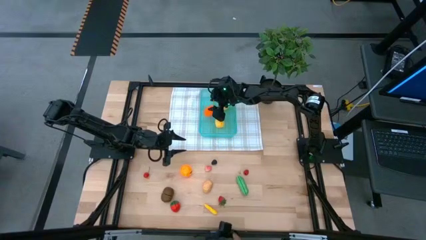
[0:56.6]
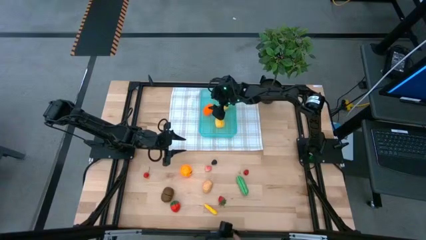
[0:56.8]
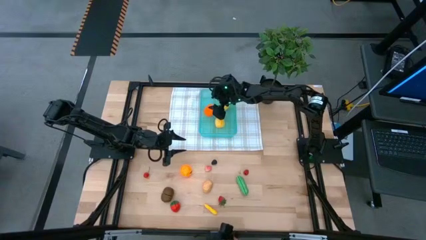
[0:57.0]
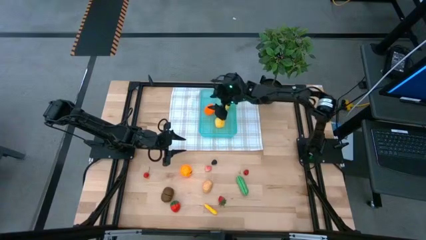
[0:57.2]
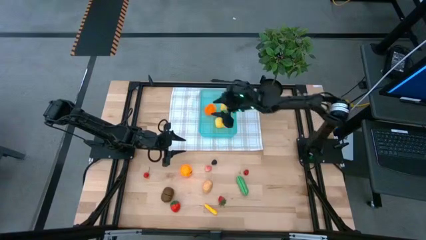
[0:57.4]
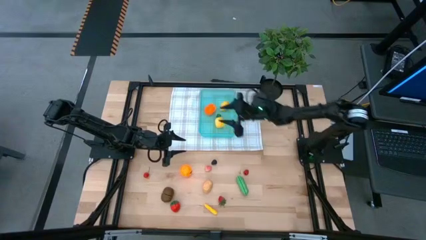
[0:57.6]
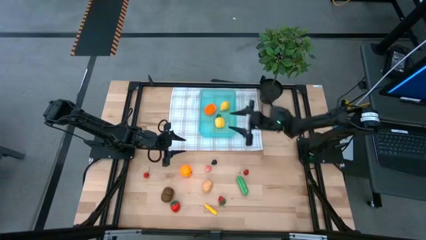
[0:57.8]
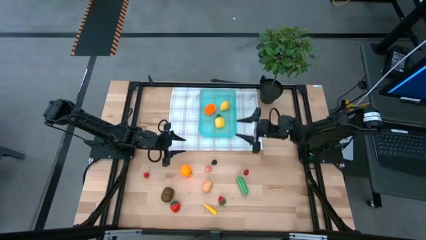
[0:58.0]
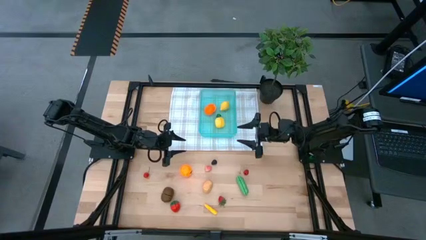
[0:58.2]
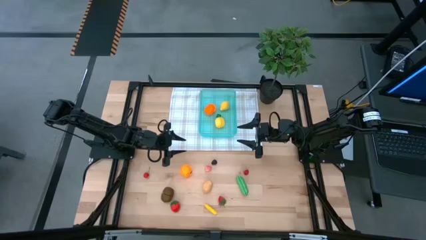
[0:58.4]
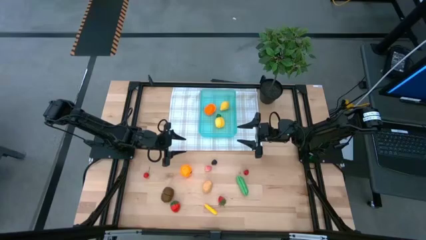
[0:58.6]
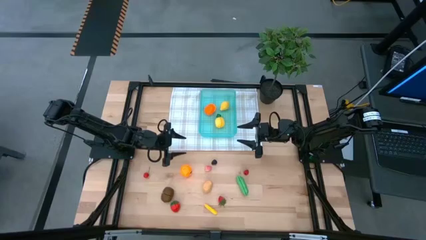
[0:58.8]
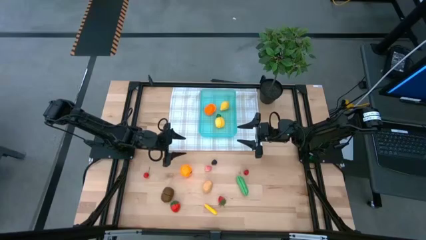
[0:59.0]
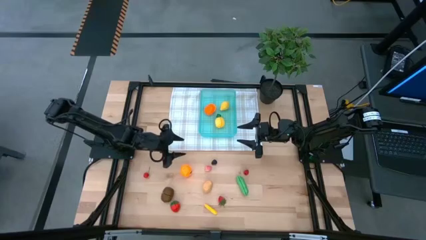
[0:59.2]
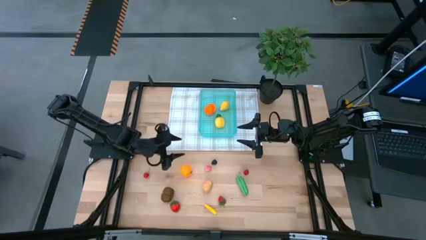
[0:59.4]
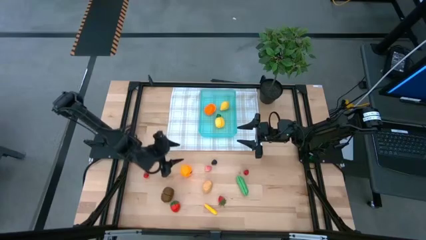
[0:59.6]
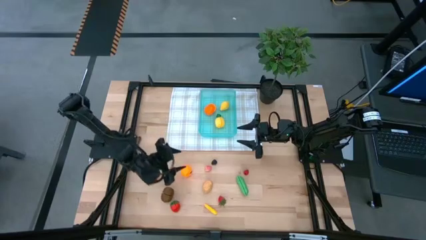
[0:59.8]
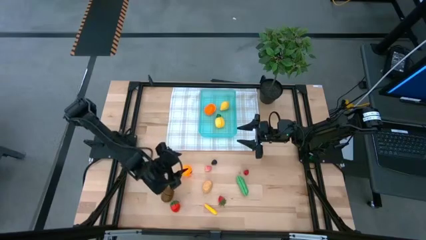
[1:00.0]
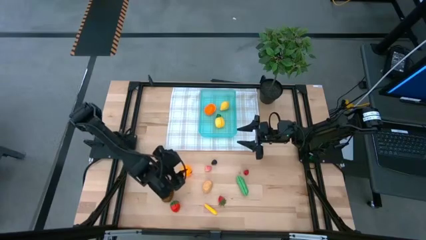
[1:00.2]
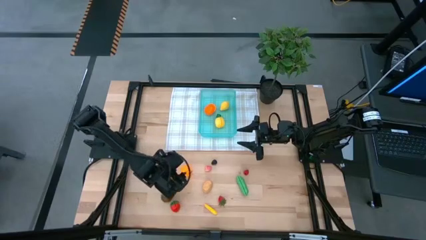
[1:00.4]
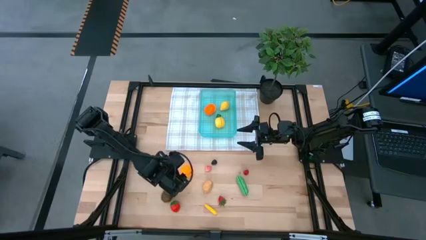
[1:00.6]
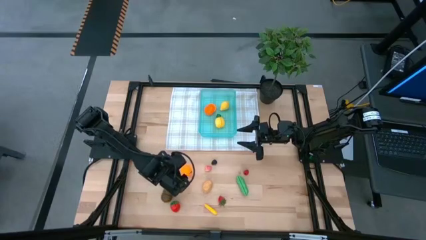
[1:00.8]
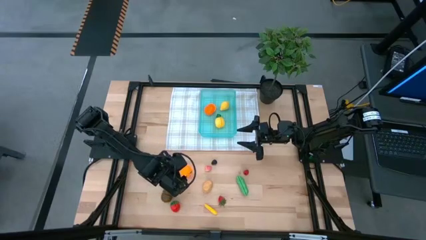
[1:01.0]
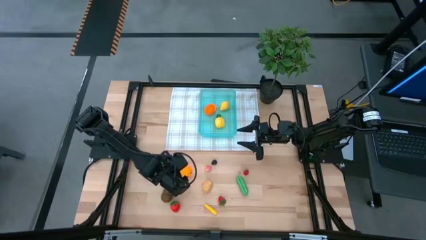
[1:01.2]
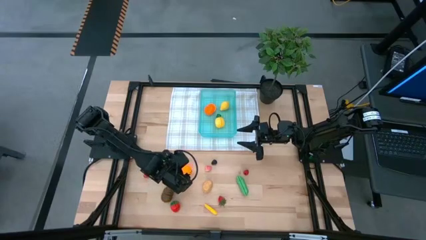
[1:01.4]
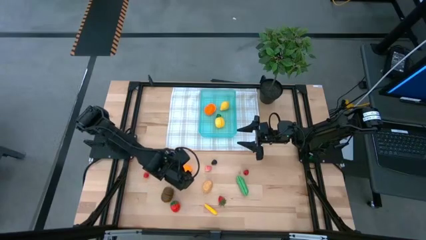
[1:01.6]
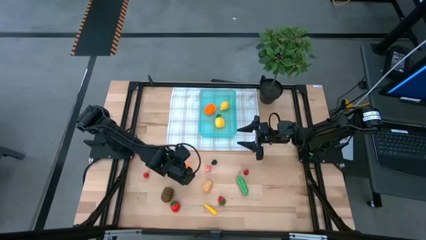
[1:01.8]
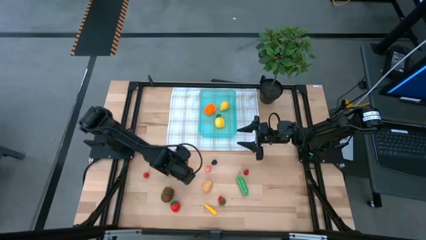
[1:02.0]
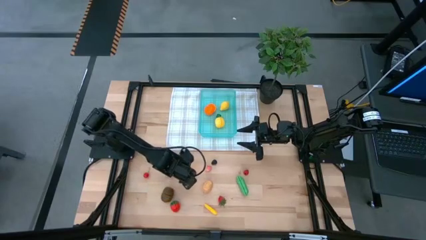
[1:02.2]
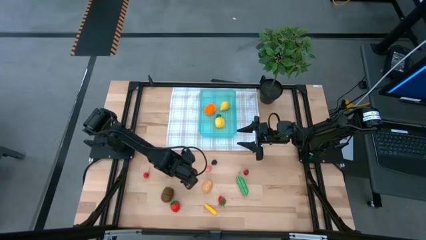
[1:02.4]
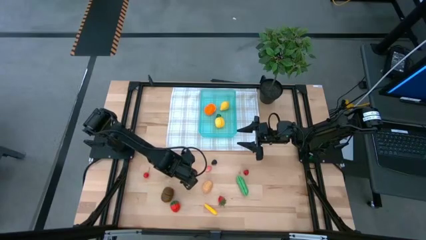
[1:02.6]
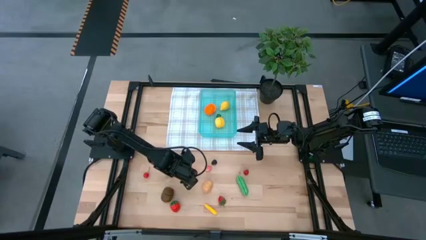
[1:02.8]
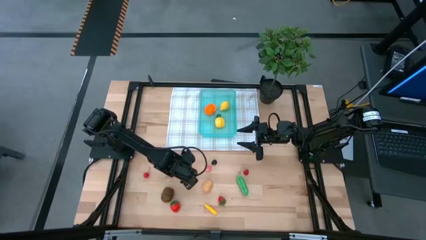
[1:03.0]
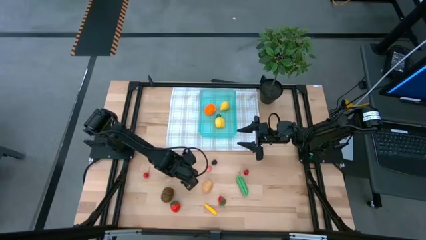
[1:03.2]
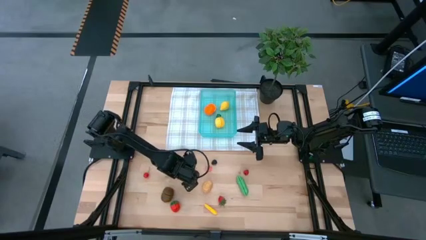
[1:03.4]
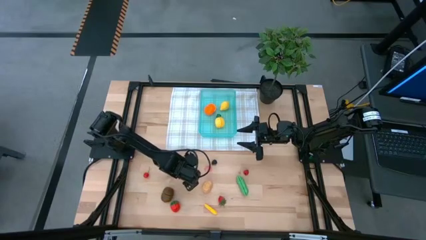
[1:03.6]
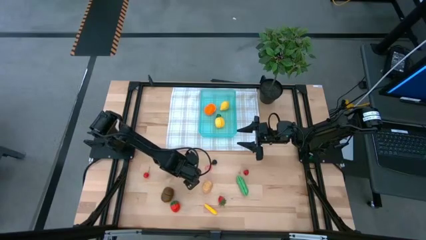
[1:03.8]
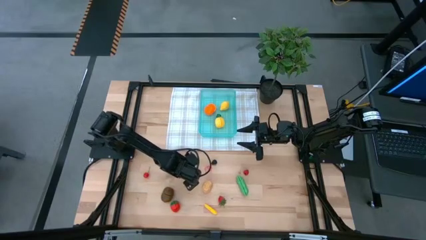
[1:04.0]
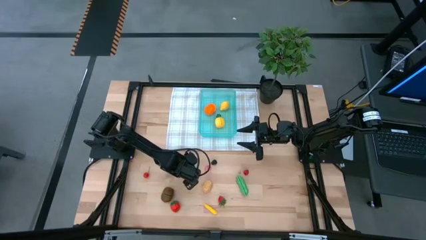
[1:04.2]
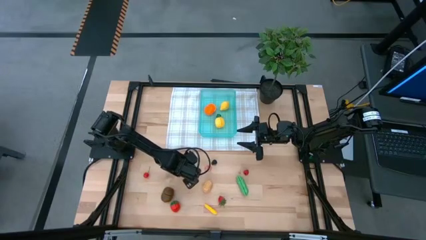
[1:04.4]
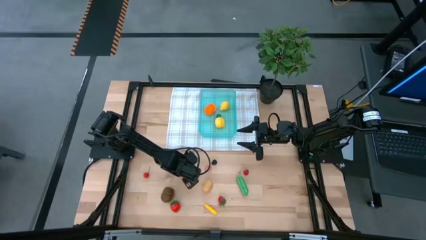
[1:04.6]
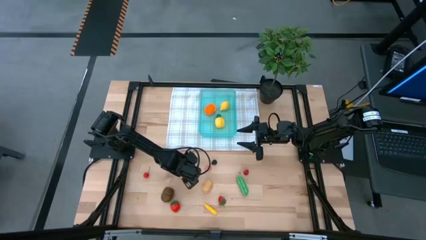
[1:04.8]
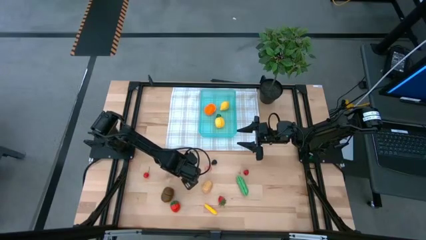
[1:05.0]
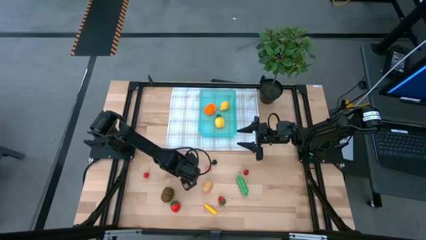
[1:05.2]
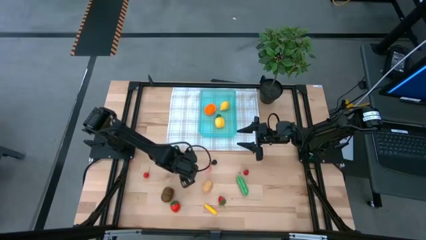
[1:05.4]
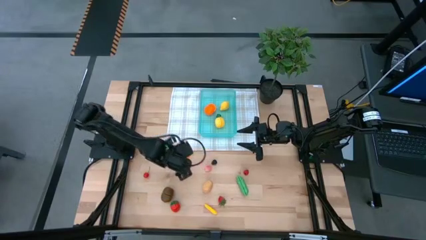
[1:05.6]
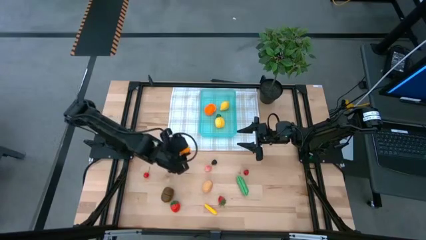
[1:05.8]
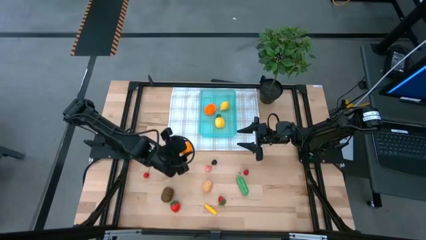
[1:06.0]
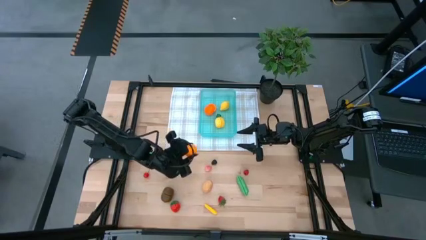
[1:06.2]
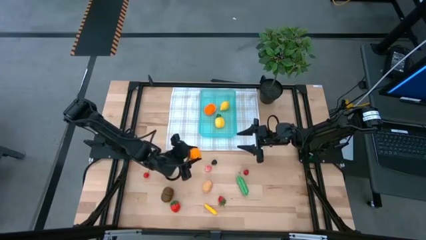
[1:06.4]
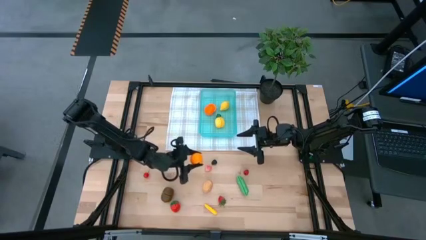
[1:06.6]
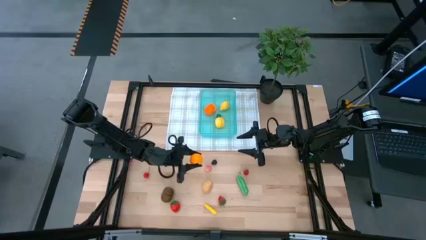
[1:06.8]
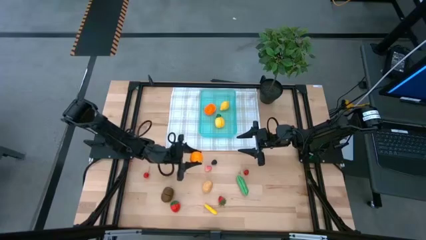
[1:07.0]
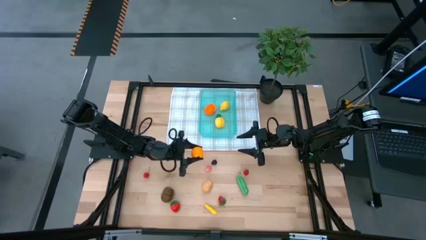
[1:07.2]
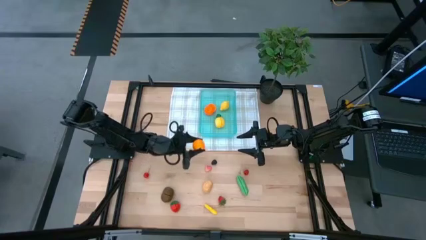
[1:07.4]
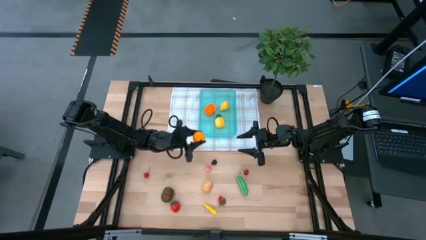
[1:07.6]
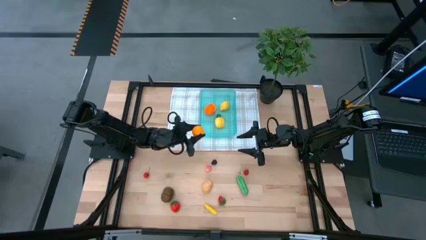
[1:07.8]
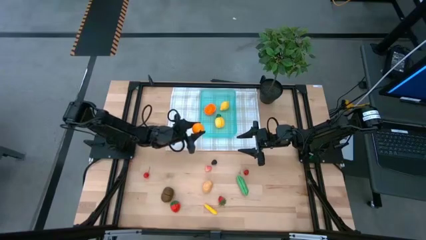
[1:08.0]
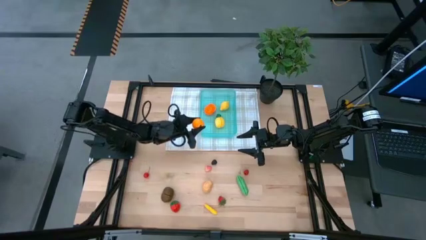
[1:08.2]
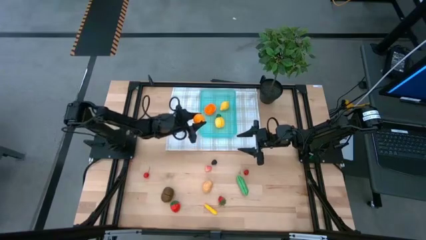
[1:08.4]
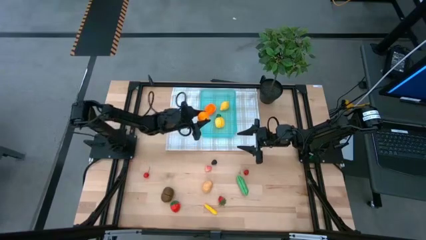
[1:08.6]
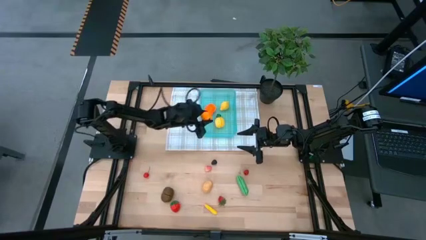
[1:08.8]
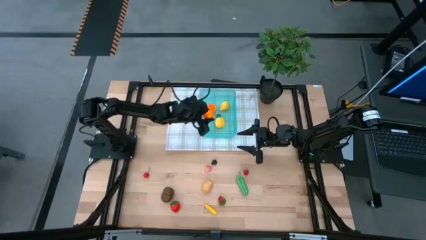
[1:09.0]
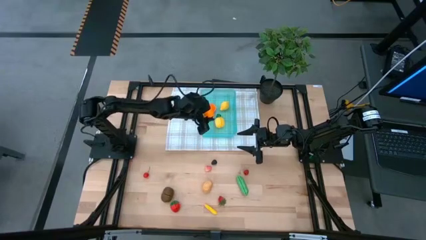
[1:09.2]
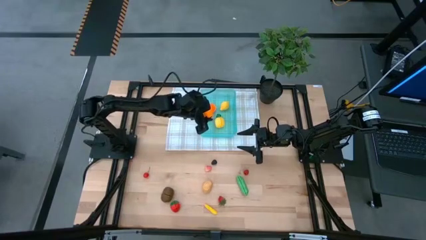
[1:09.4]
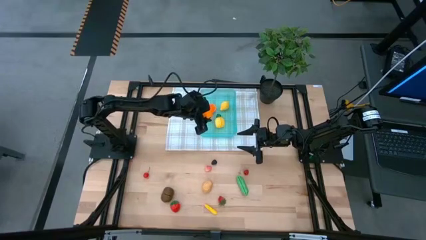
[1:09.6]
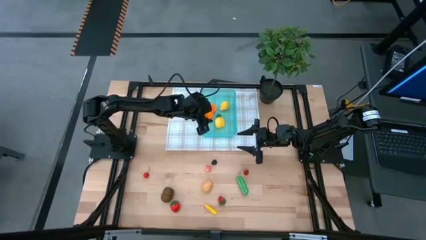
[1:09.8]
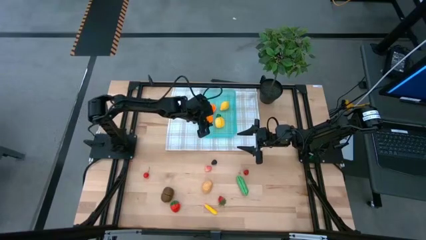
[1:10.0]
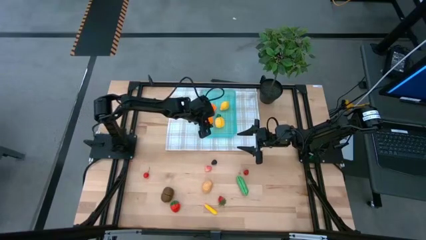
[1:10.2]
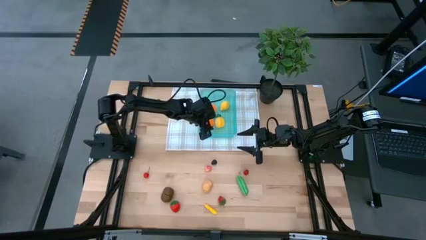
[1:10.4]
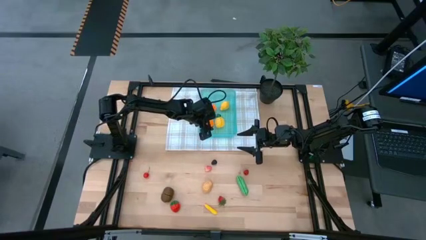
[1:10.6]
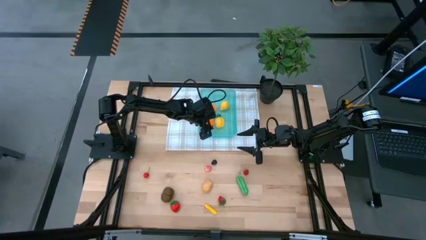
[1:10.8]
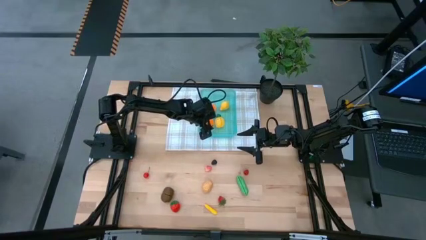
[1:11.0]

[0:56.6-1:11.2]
Task: Pick and placing Produce into tupperware
Put the orange into the green bin

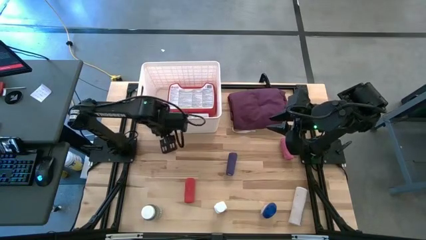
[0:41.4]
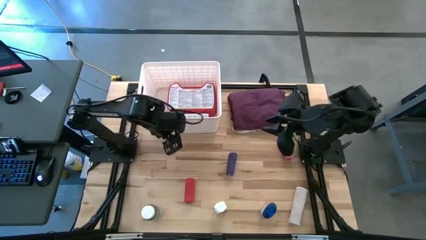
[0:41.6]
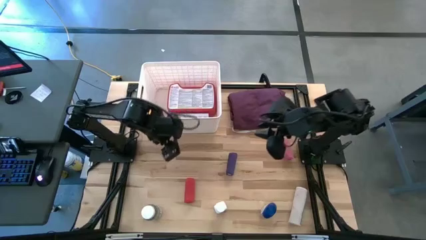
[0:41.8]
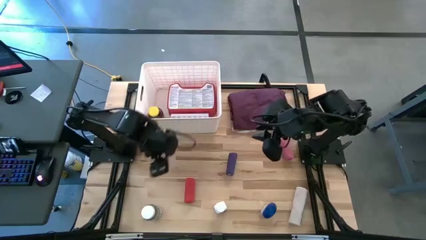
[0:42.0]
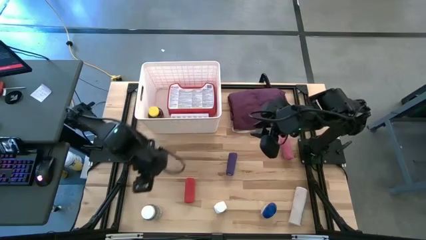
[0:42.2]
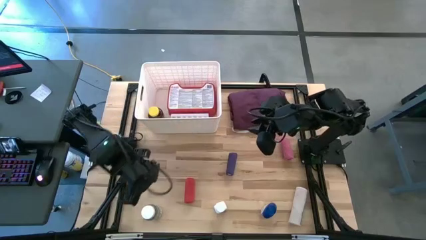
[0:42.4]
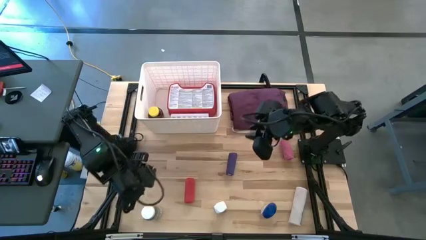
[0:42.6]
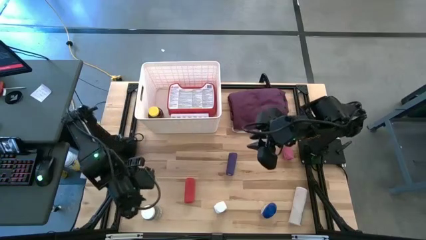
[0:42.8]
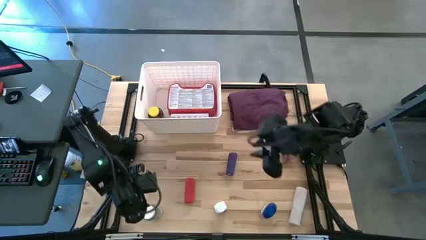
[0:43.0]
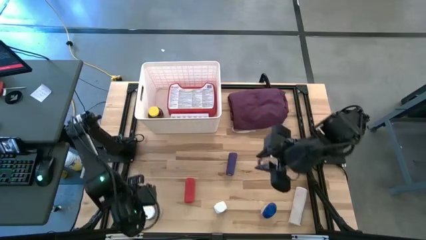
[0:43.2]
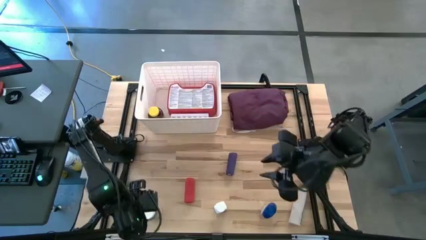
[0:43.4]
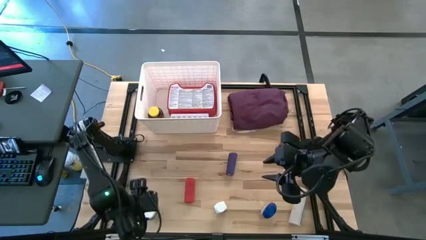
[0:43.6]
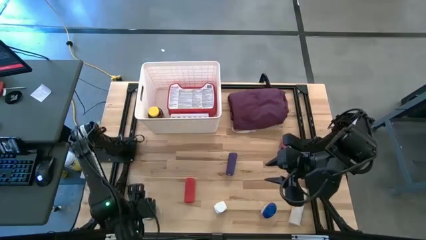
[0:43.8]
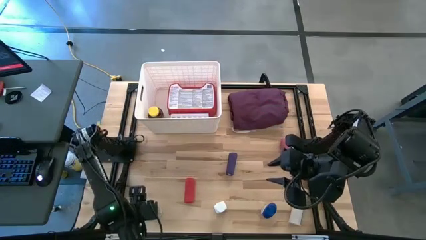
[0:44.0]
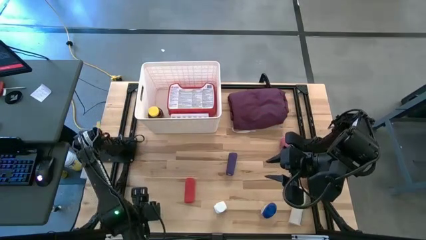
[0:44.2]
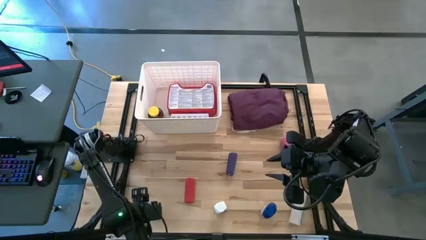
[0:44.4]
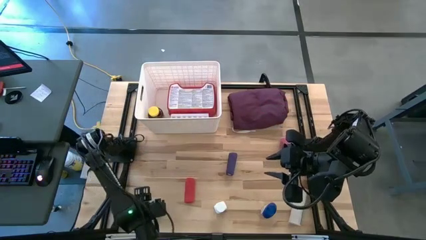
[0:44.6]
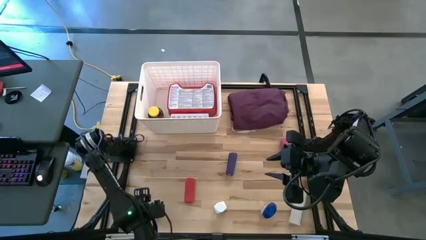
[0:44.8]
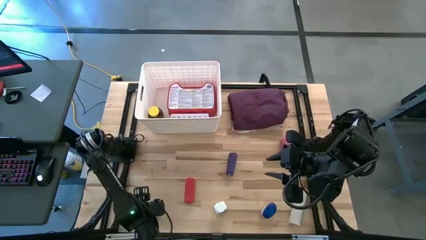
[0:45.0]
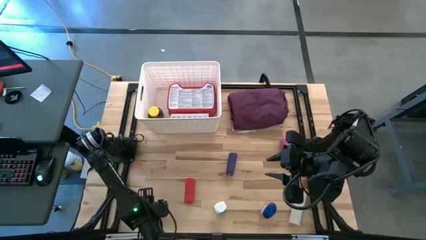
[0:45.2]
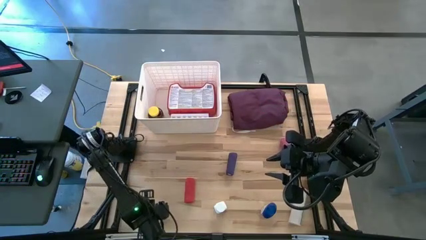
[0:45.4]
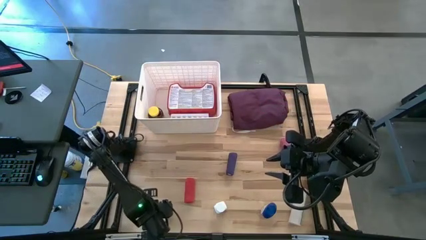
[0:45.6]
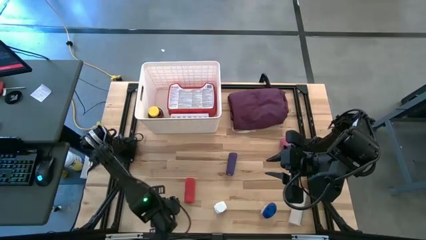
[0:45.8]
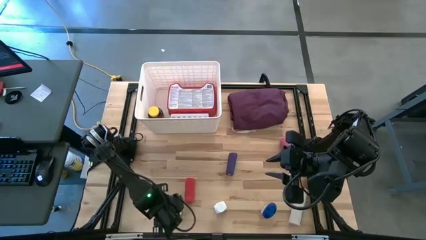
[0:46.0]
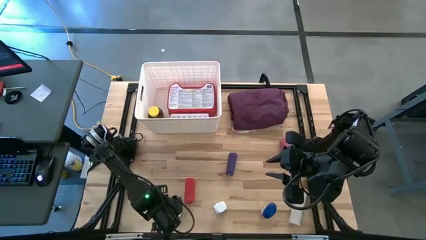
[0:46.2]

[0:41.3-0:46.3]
Task: Pick & place medical supplies in basket/bin
Put the green pill bottle into the white bin
